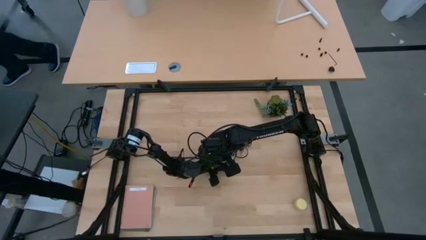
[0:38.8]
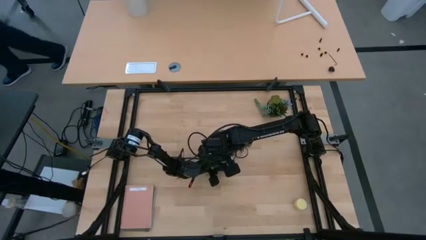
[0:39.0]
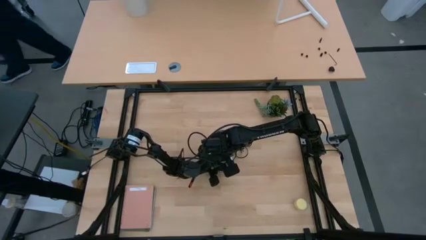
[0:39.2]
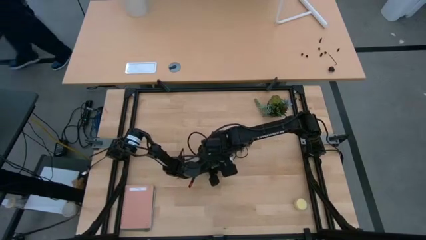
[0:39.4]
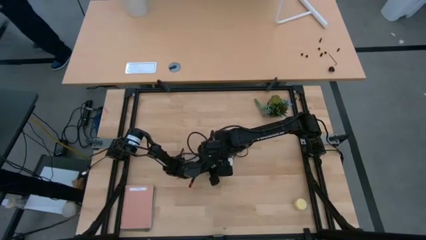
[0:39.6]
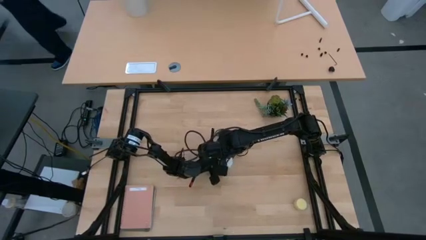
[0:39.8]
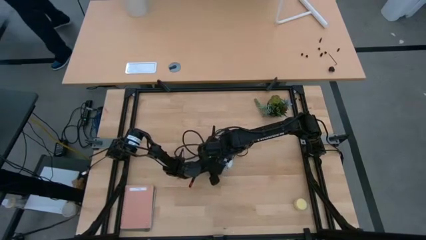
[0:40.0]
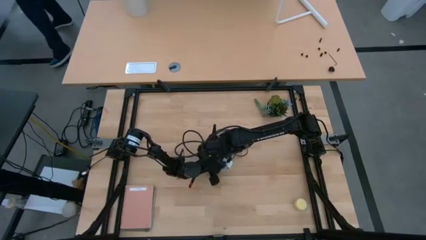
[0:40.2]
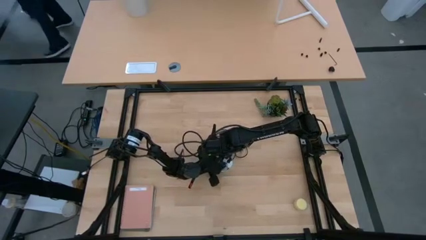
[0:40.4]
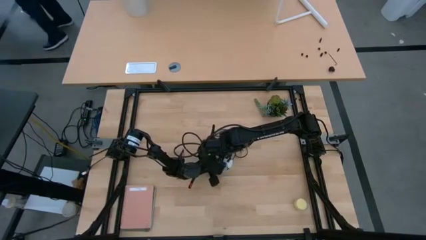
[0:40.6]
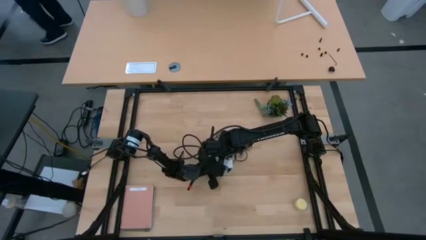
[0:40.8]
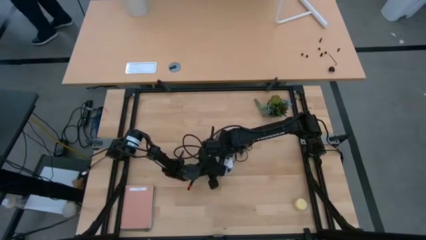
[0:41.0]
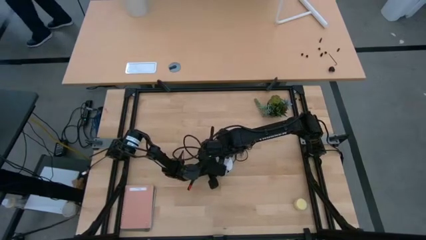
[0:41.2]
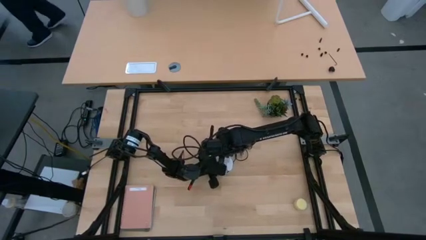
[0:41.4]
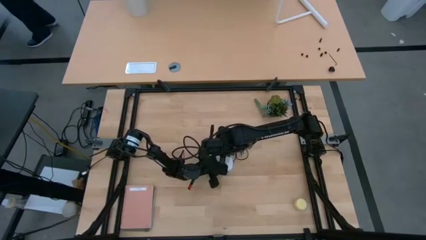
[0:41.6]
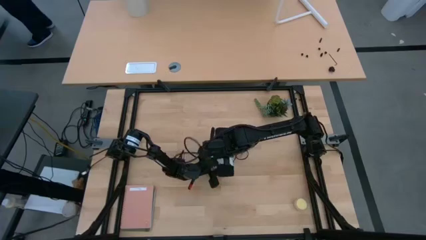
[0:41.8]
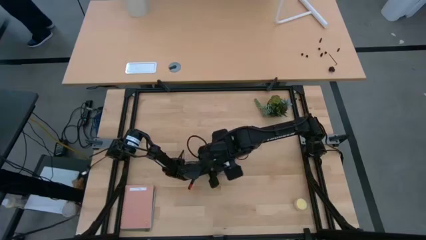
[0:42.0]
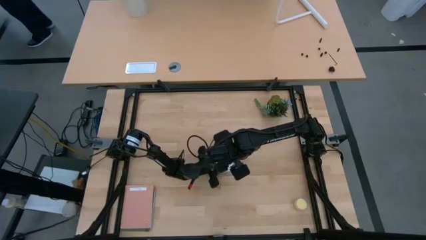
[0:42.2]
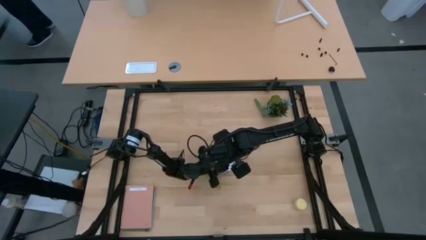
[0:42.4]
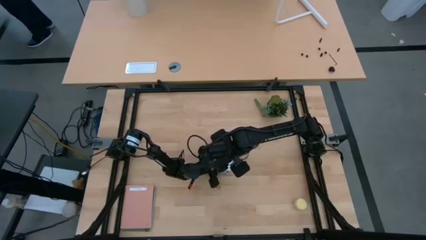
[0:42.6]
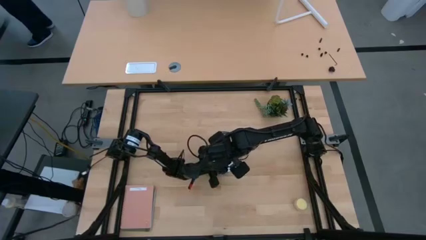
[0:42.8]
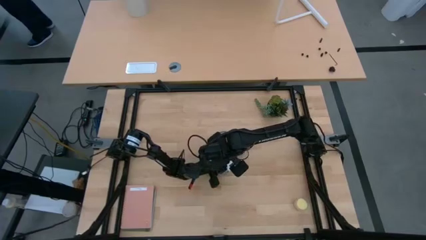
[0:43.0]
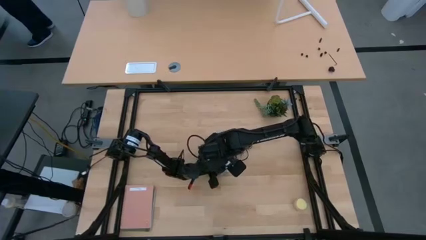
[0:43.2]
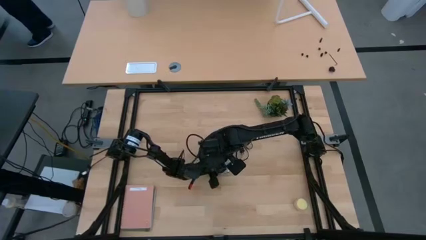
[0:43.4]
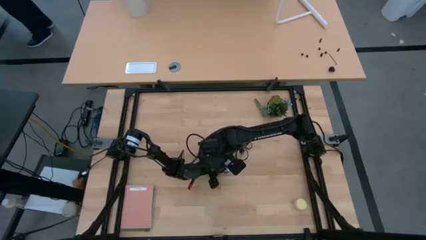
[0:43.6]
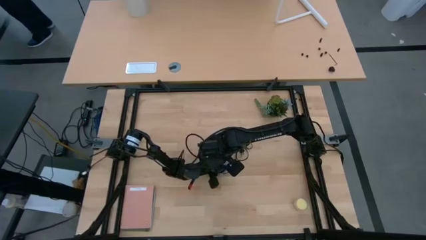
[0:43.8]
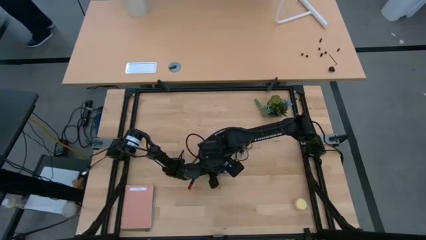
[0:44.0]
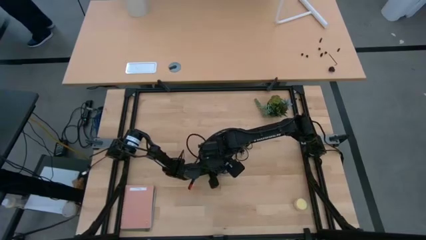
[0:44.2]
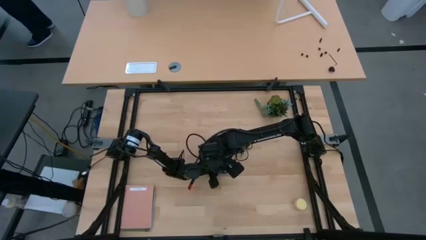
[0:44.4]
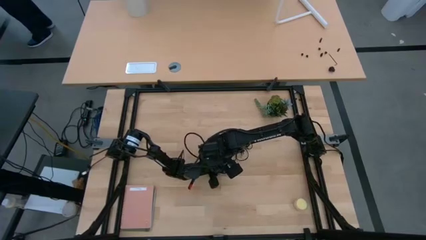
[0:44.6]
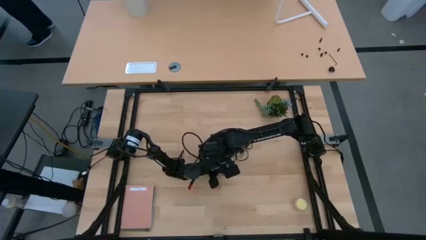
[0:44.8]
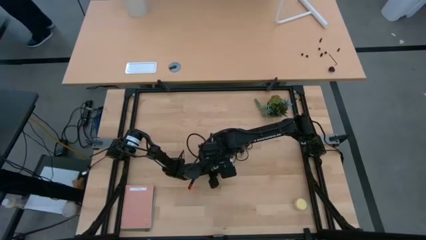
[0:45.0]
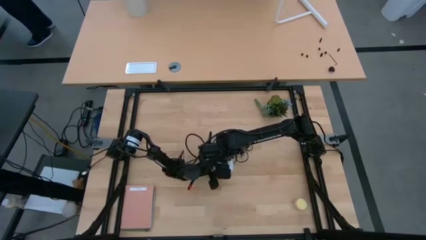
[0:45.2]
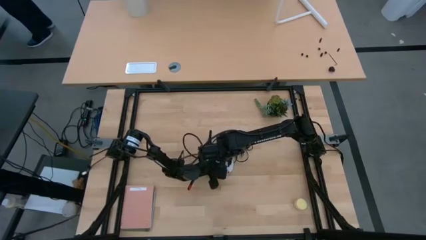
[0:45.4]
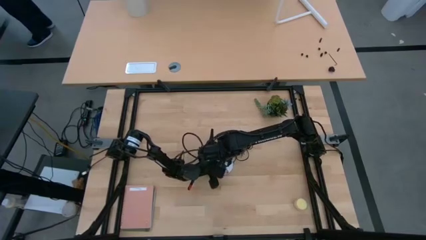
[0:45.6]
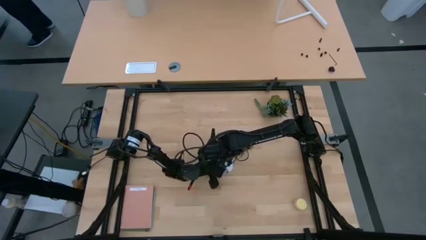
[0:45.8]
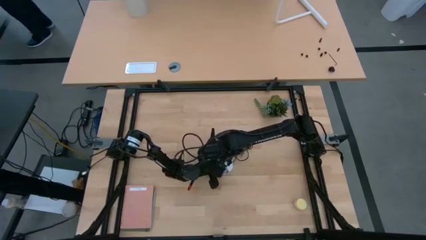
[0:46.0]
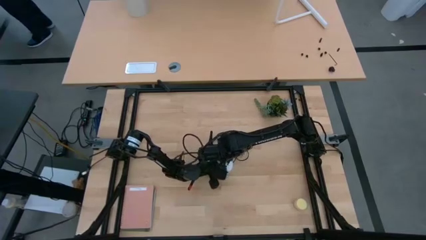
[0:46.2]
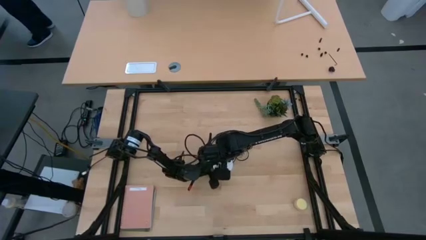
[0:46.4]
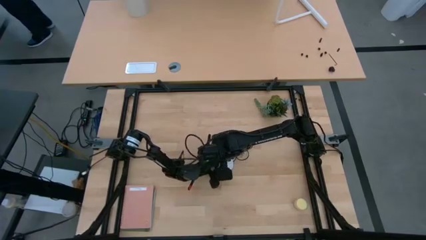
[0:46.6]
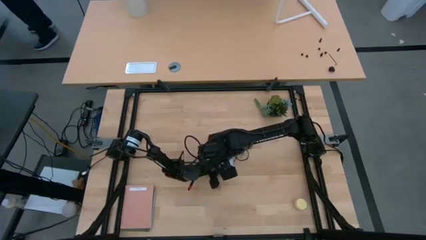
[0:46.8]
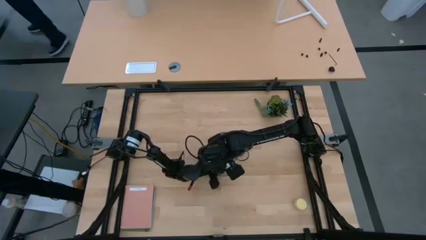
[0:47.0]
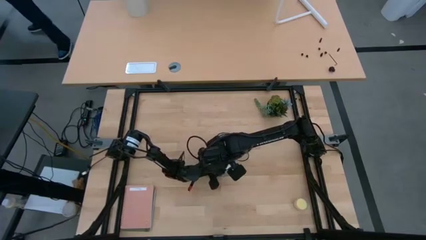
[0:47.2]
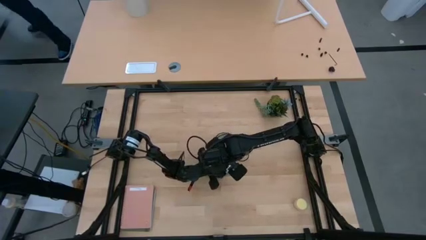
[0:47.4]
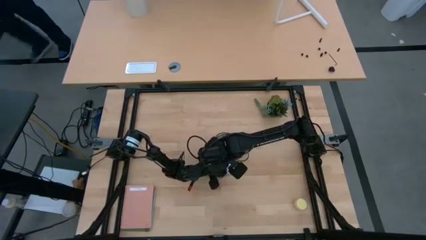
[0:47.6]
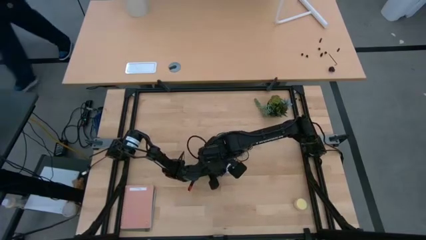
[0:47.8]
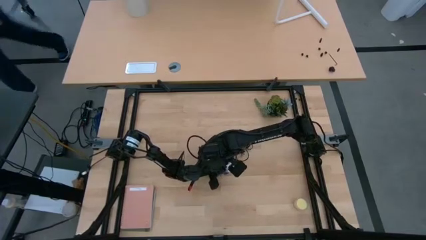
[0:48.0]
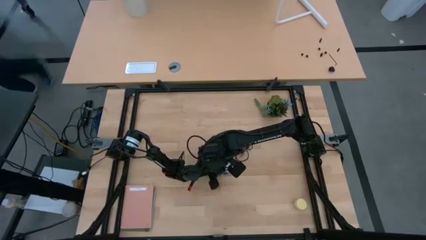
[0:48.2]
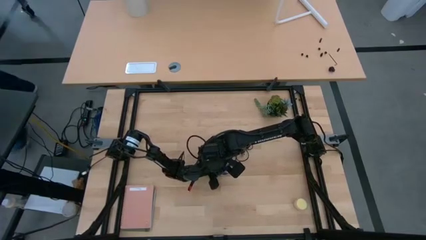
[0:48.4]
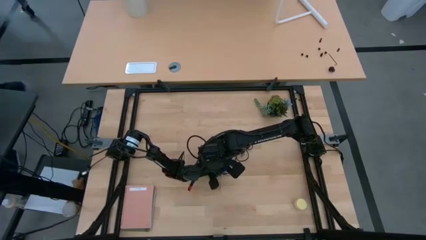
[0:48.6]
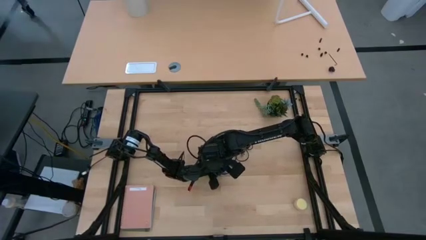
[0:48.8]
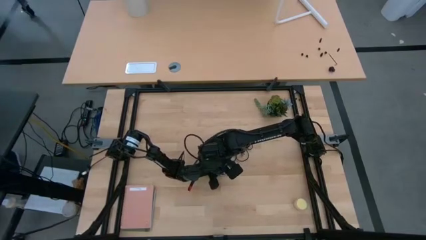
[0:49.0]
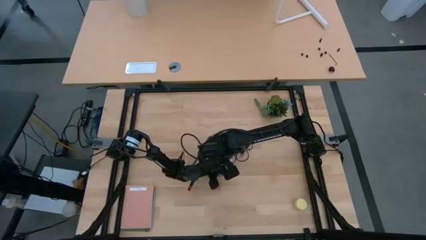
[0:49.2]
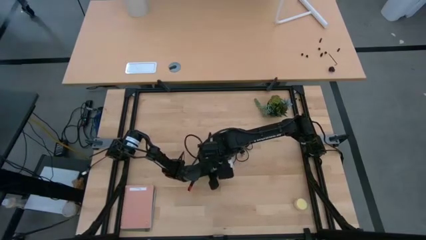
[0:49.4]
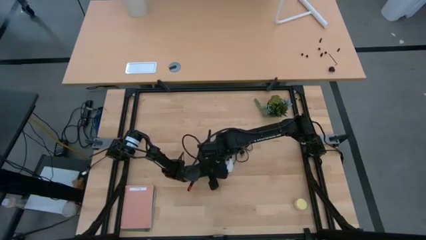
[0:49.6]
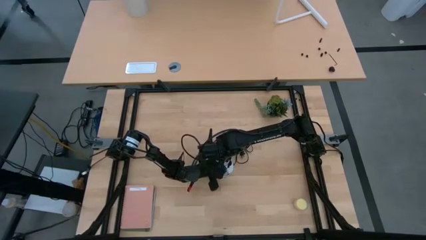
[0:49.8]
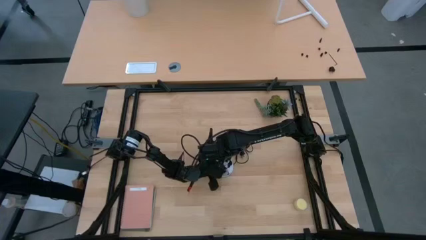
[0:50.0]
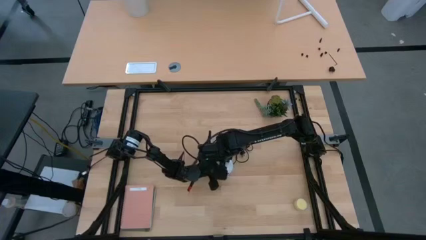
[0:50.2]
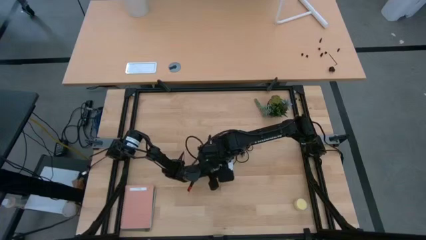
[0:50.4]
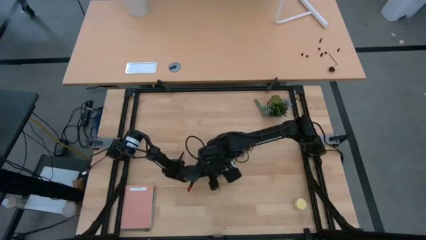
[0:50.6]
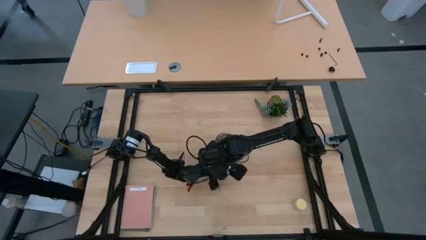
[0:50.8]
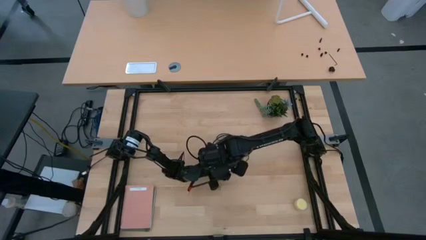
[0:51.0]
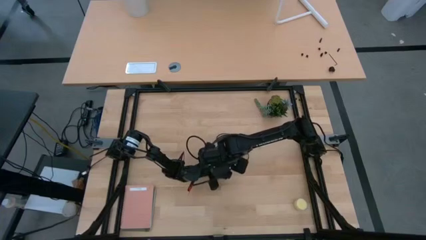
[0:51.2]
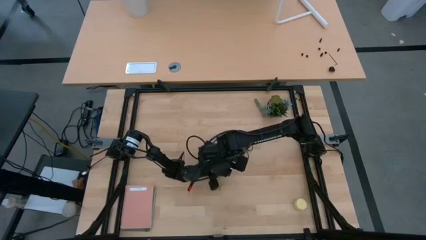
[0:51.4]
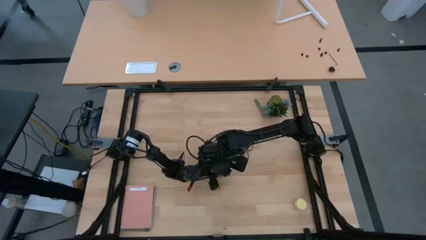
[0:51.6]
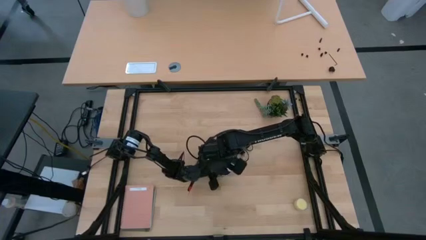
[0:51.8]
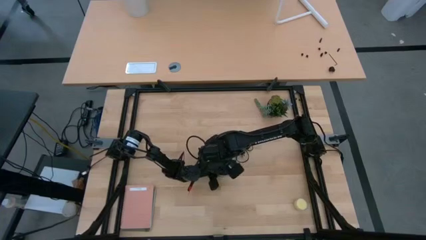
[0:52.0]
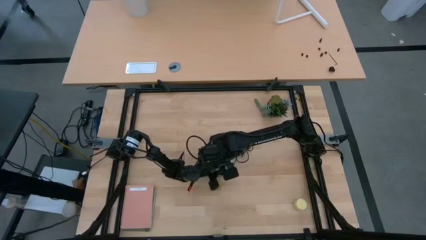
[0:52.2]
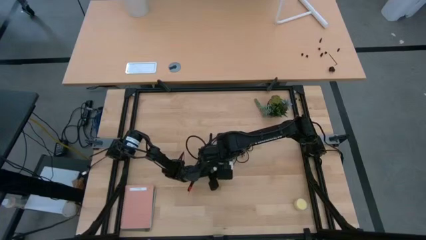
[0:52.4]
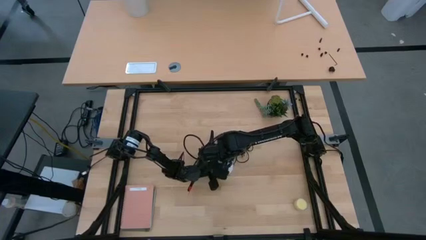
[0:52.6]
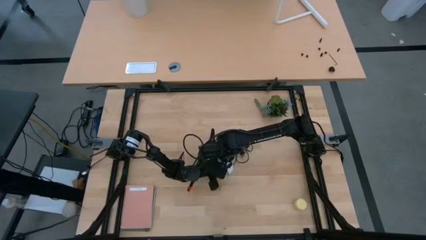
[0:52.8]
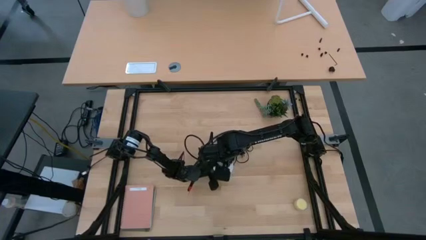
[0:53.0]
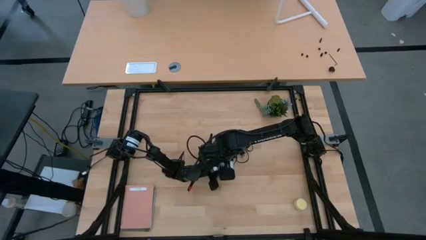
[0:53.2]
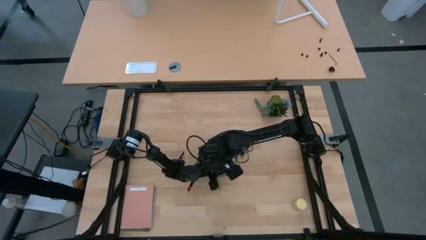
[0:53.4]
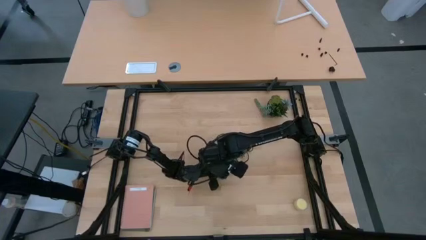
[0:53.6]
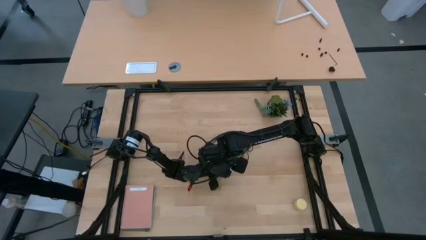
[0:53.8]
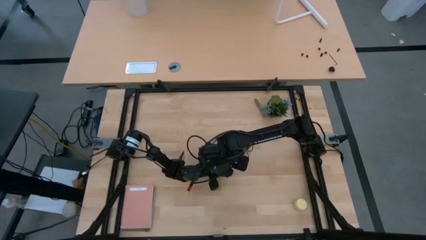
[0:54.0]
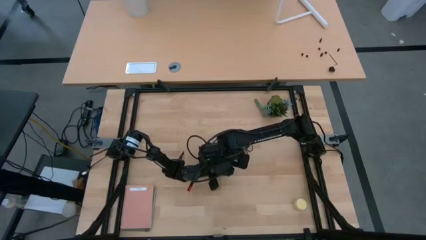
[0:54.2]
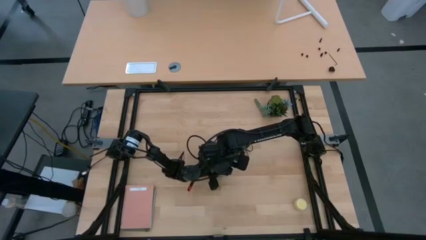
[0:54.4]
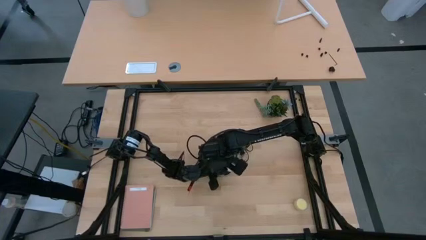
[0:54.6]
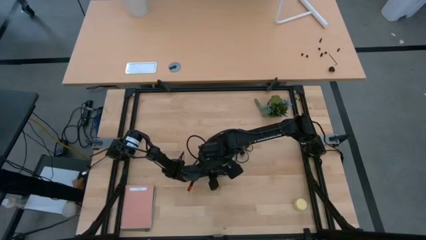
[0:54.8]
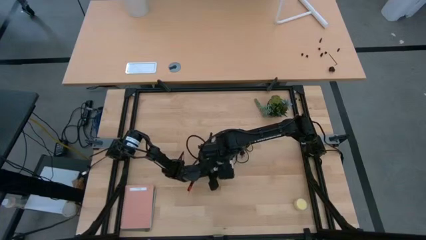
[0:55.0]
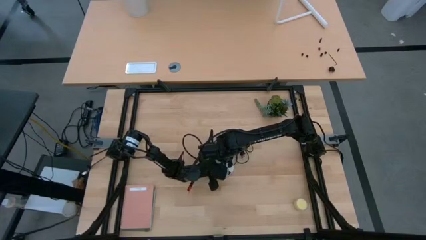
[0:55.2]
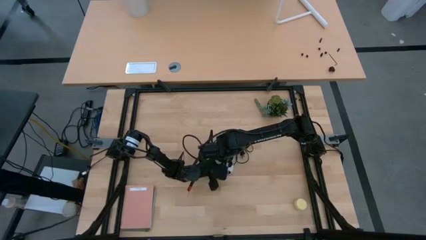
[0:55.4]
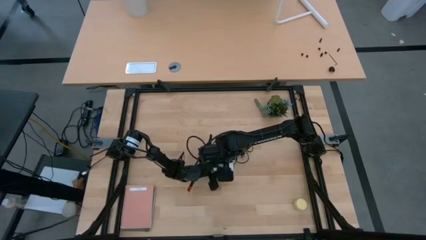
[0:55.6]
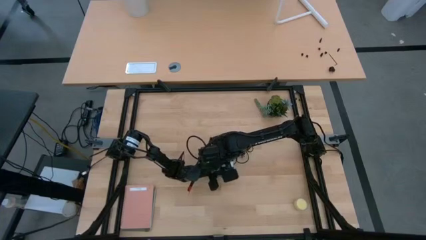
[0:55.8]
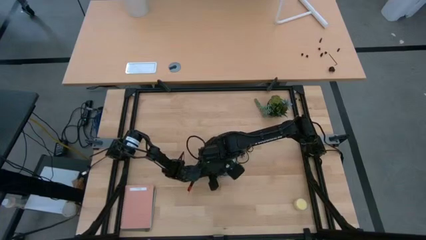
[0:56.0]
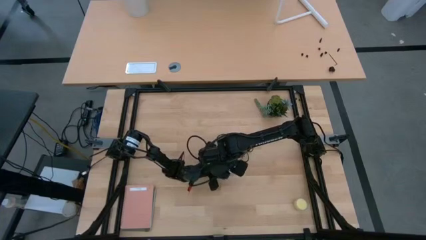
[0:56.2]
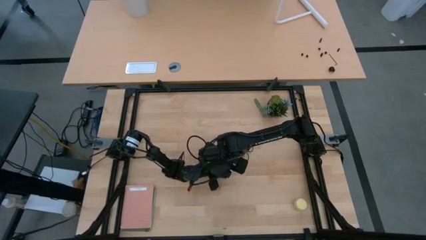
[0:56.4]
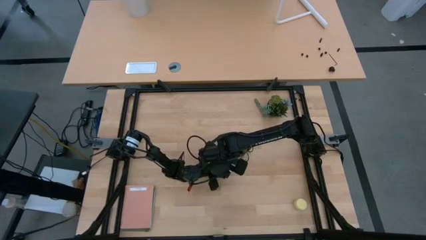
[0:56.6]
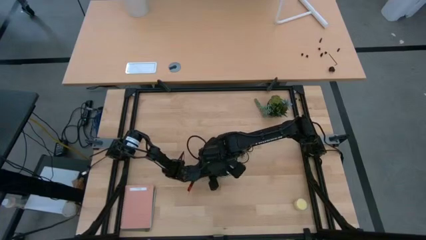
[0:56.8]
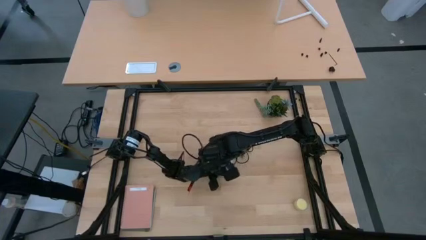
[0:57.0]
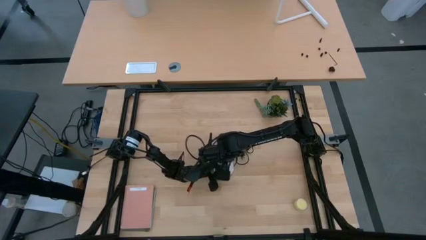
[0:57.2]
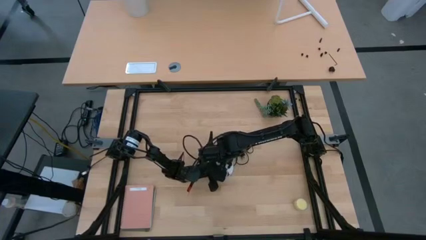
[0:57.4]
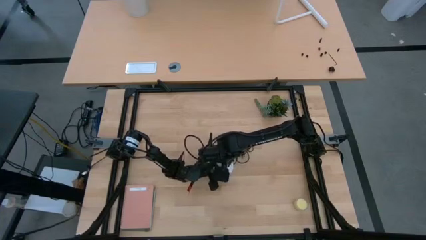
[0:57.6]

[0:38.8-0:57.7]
Task: Screw lightbulb
Insert the lightbulb into the silver lamp
